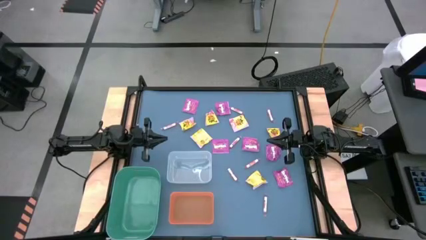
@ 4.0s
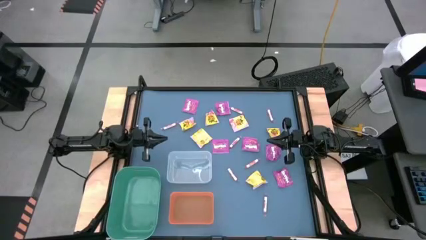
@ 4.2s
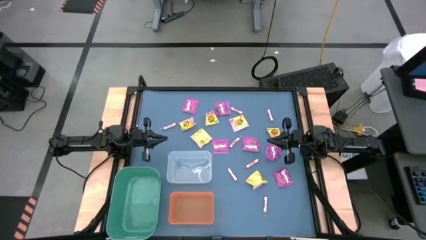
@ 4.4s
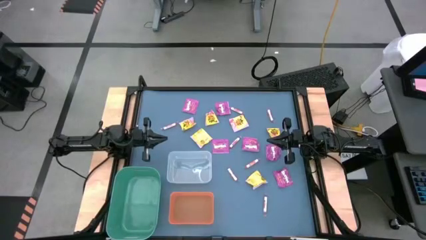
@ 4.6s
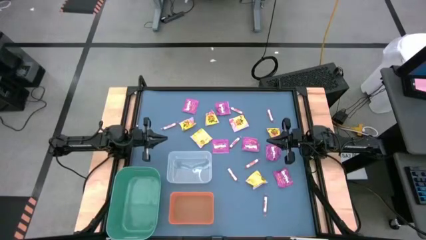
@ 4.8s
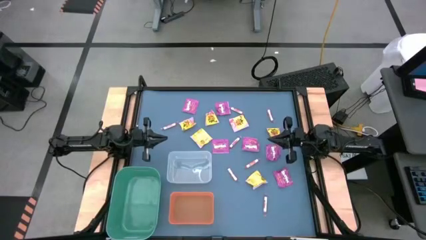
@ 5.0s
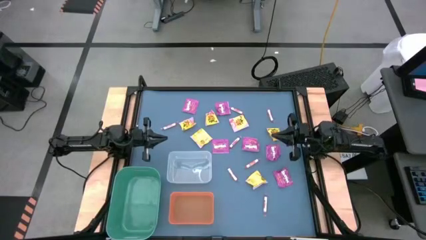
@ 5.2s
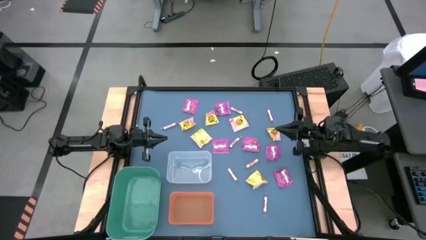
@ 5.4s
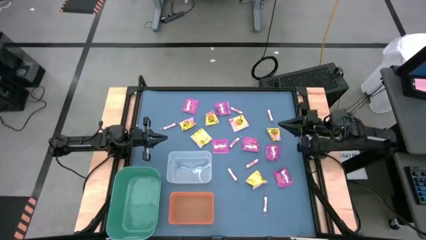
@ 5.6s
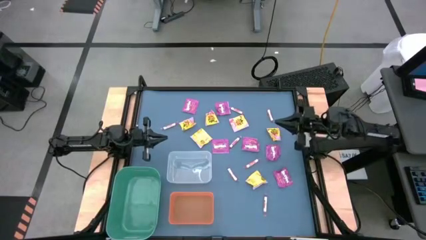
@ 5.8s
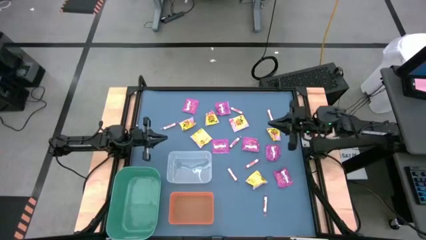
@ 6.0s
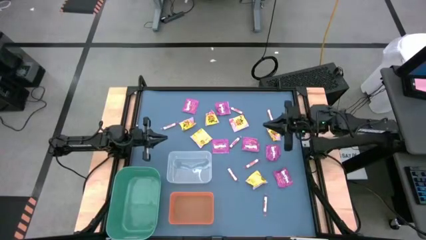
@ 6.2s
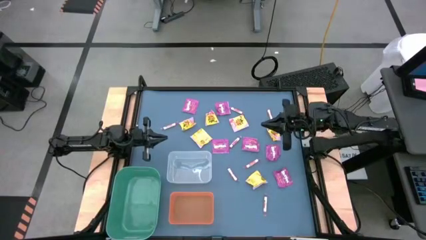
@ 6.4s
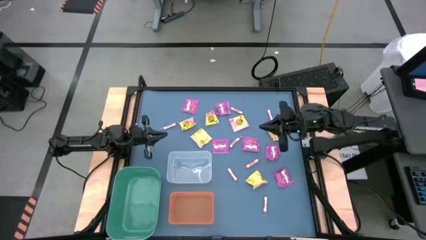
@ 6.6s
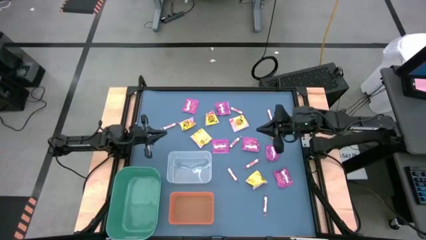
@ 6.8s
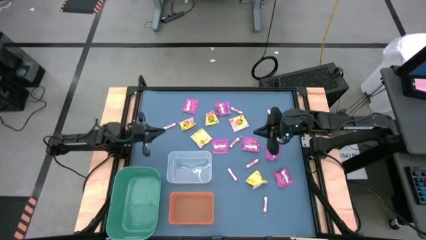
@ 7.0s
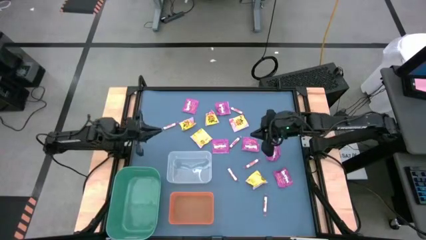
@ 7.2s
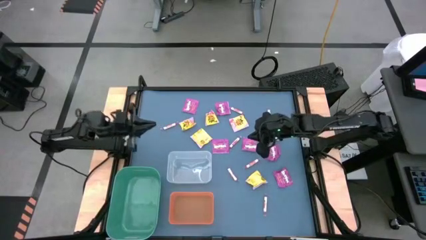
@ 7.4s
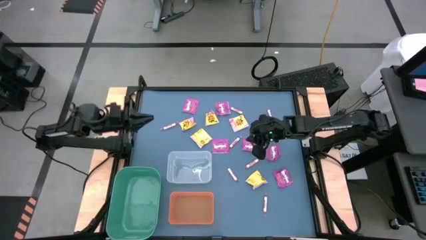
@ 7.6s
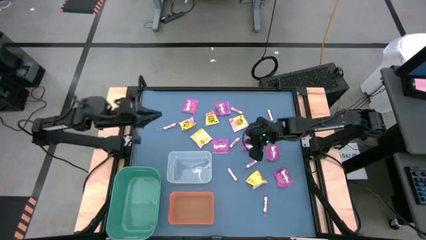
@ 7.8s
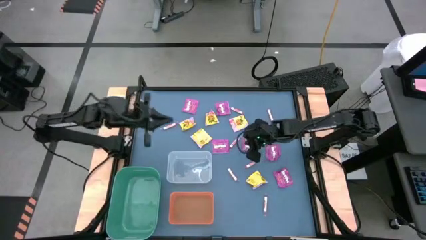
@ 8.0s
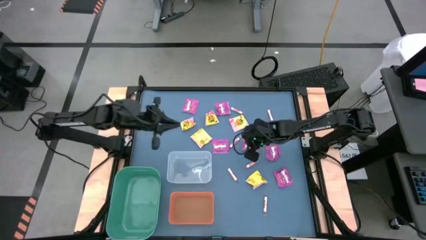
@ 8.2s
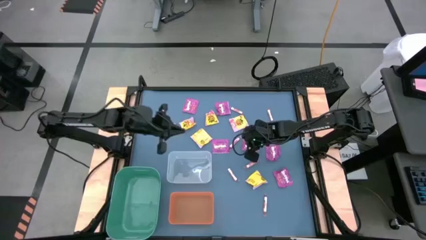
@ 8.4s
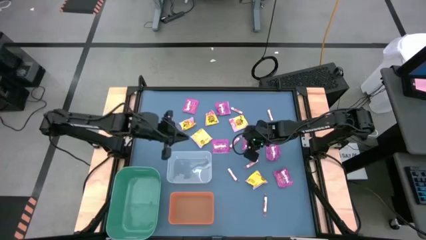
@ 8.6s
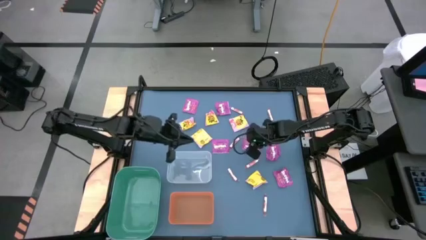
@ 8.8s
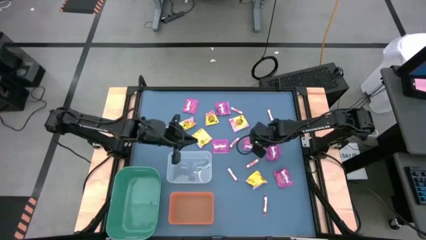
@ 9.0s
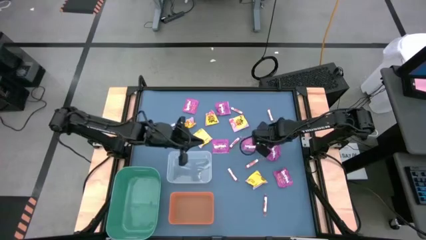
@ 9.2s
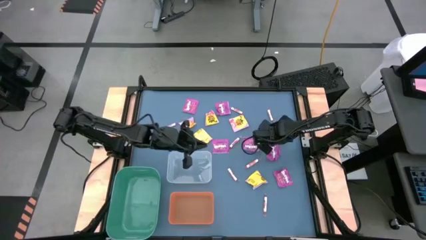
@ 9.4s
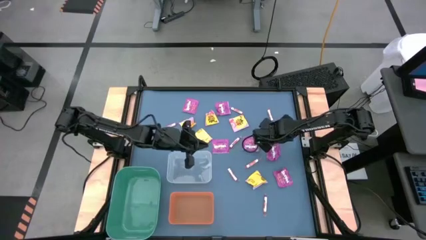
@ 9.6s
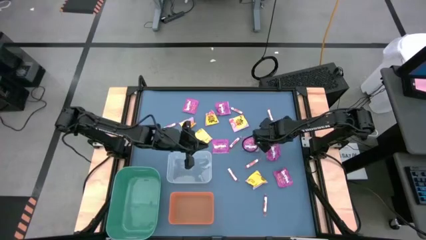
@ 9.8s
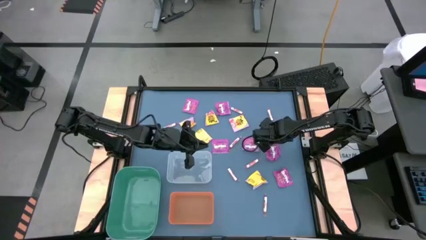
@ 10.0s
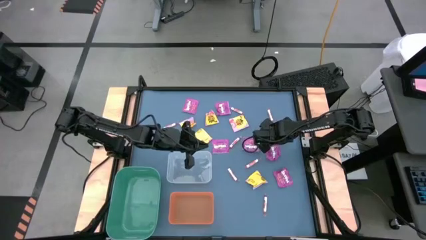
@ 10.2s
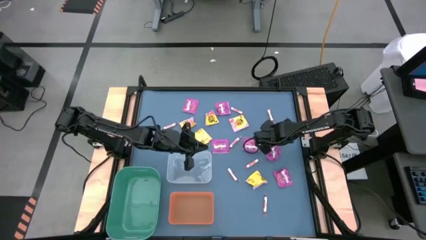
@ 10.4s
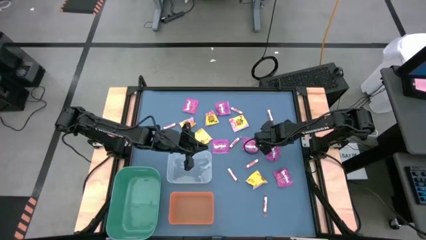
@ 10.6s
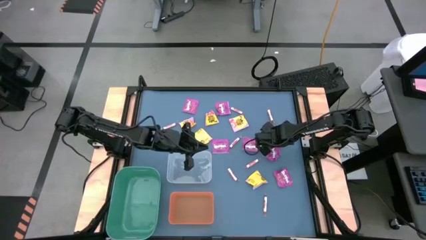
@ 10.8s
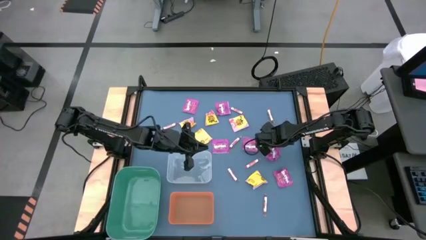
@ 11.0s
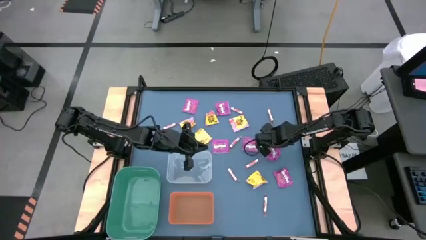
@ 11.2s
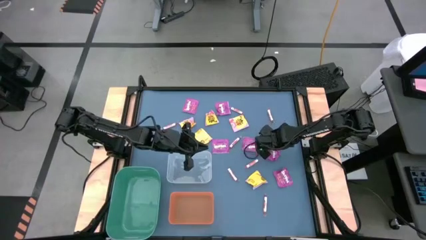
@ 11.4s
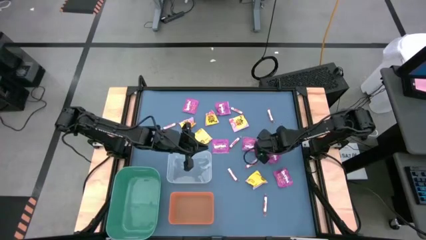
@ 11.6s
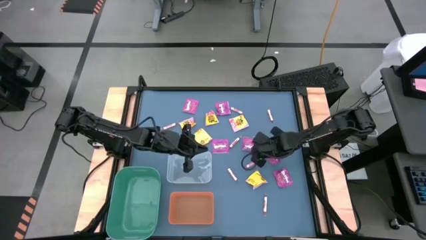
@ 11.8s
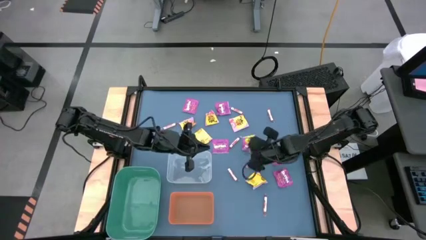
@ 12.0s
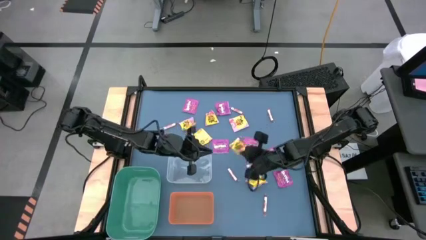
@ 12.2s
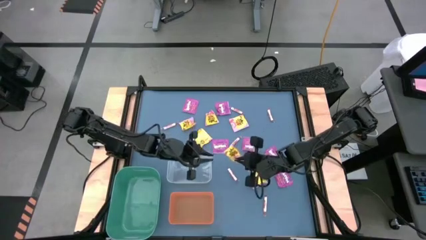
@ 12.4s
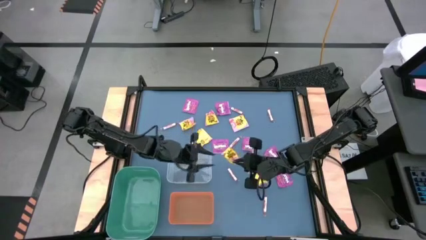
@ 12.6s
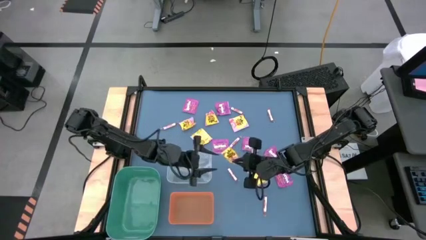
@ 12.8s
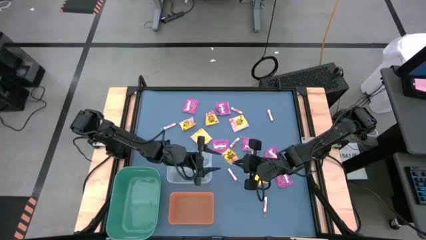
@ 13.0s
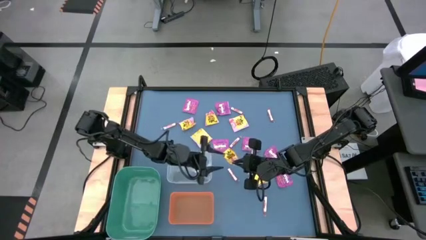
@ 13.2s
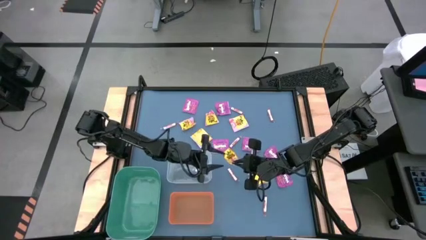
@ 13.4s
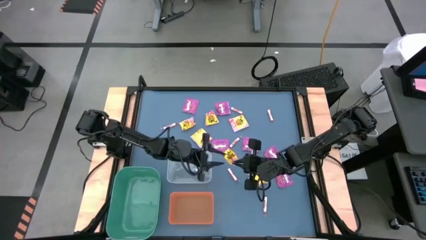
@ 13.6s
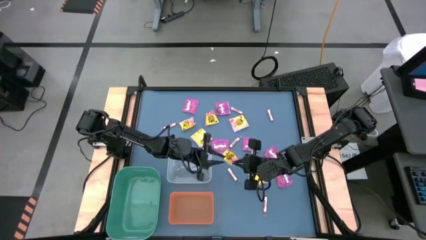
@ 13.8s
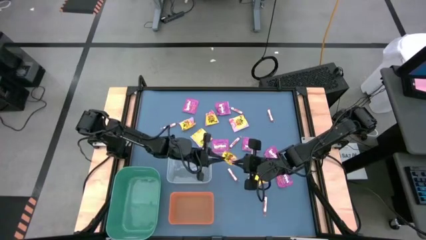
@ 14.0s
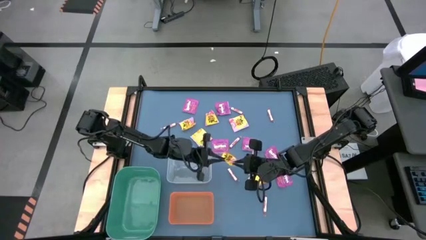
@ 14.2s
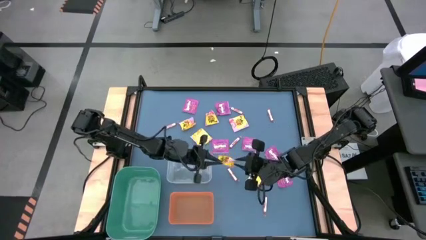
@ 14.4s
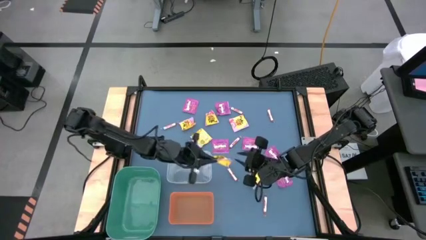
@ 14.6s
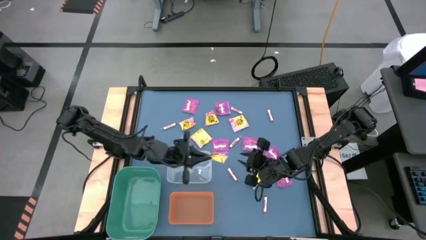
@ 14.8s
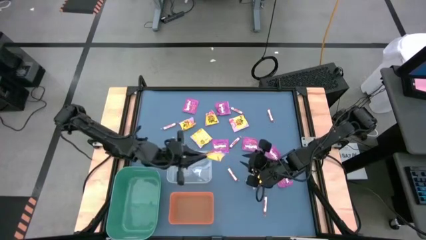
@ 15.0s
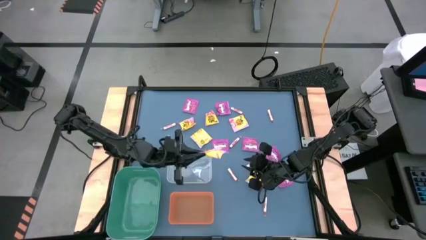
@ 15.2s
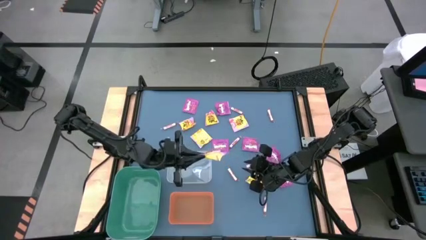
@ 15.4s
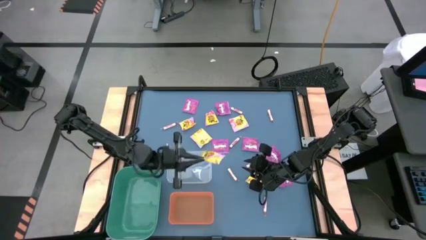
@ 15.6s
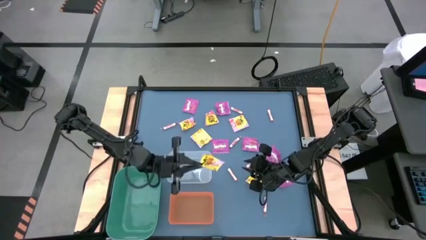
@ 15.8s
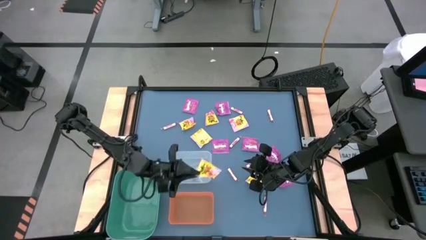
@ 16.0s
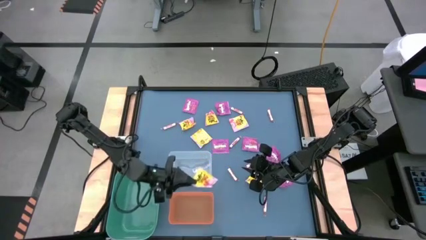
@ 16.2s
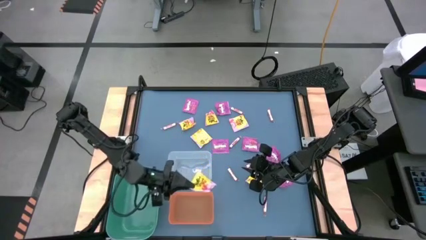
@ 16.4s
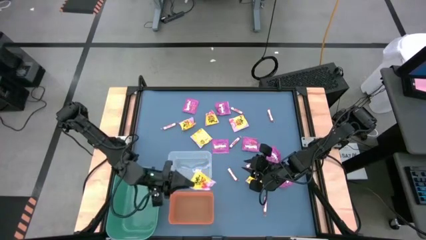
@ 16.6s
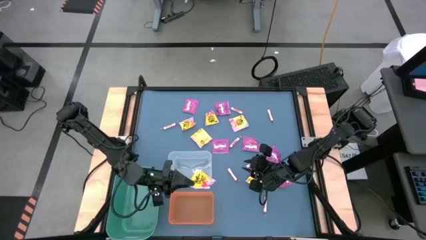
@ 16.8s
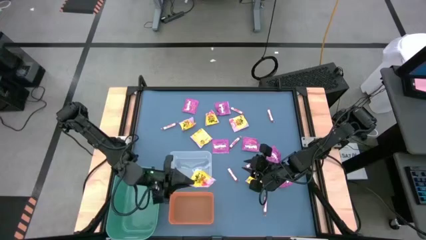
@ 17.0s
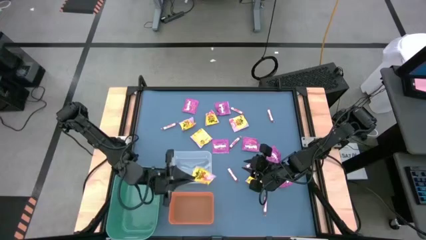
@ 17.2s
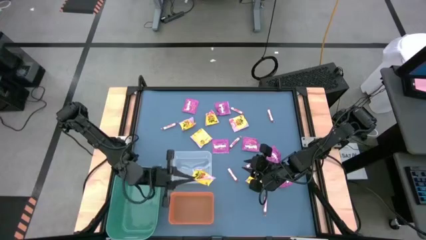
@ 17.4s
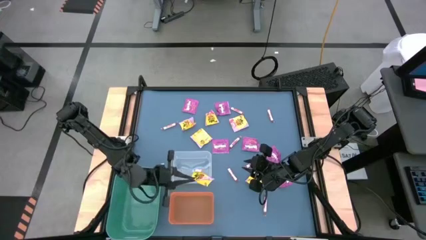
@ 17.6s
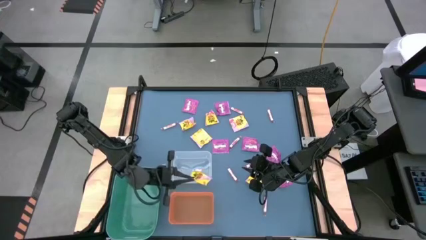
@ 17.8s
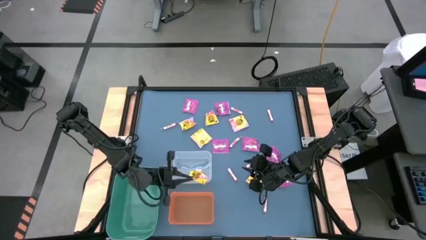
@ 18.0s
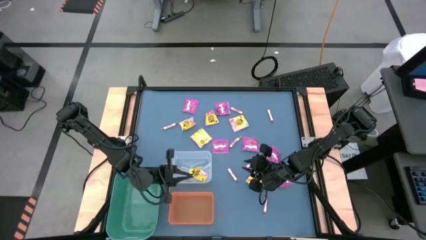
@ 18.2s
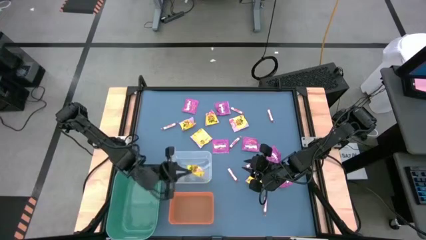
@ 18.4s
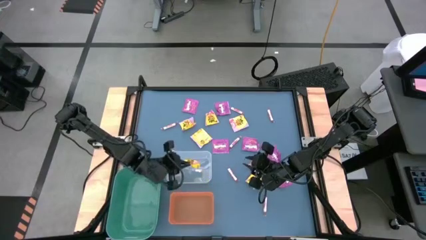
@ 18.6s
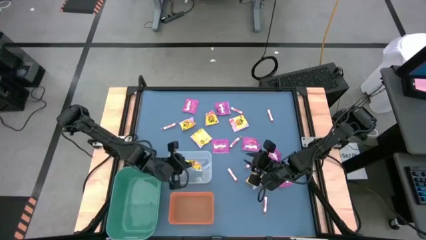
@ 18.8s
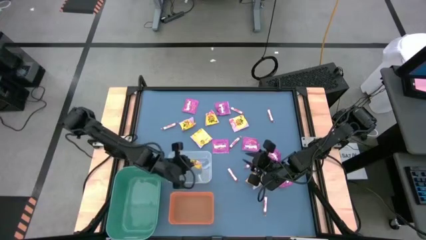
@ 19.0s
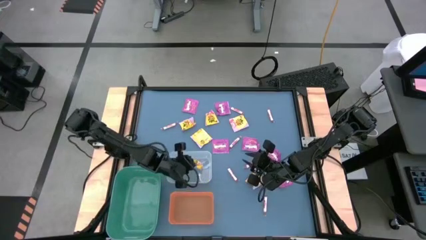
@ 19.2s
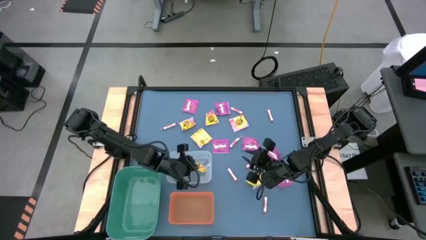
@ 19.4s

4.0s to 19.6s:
Task: Sort candy
Put the yellow candy into the transparent bin
